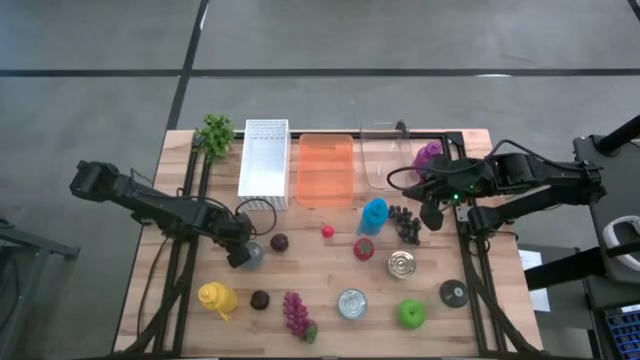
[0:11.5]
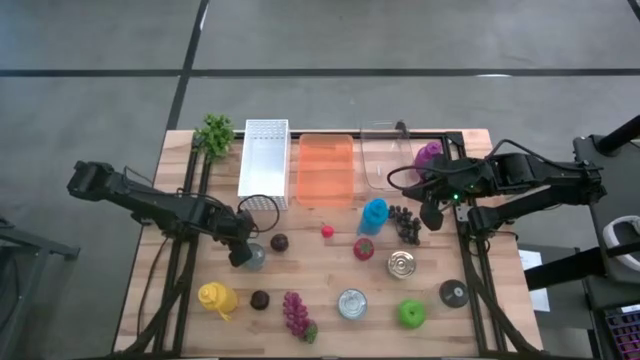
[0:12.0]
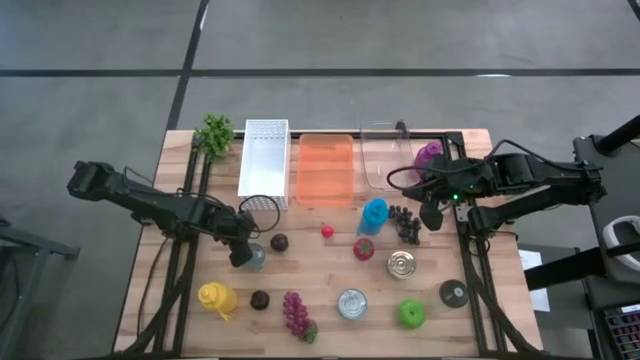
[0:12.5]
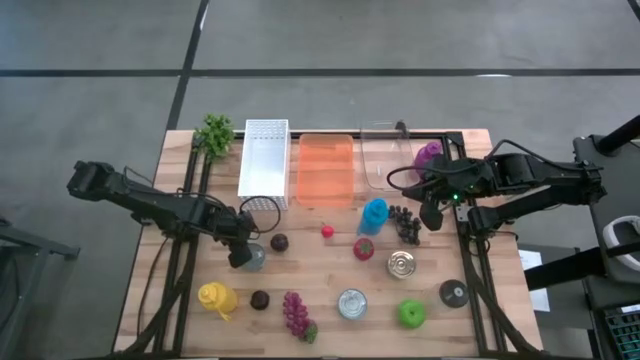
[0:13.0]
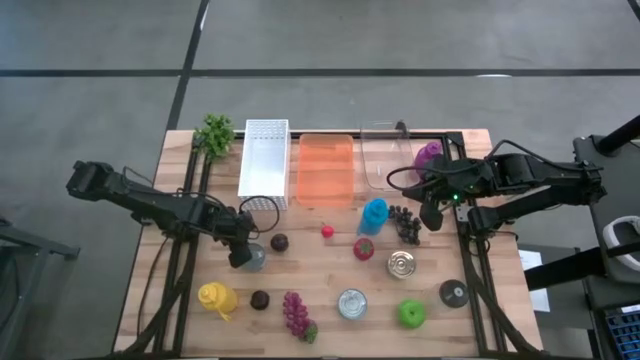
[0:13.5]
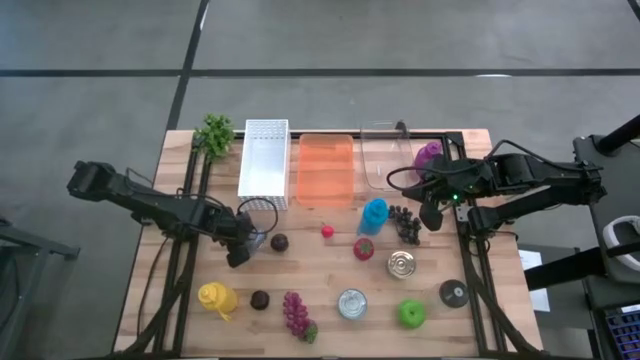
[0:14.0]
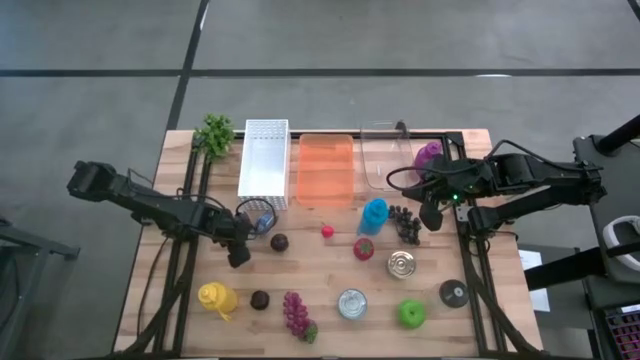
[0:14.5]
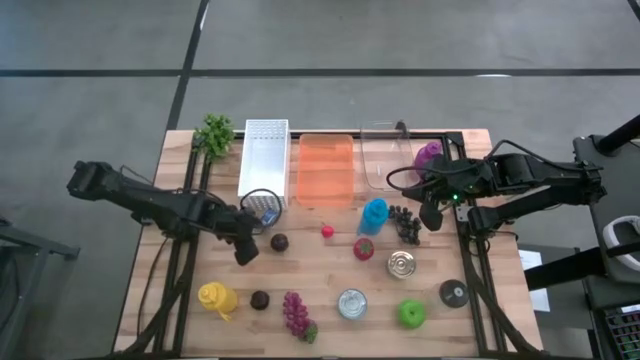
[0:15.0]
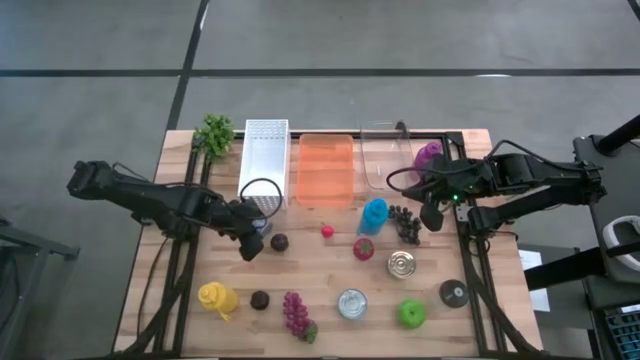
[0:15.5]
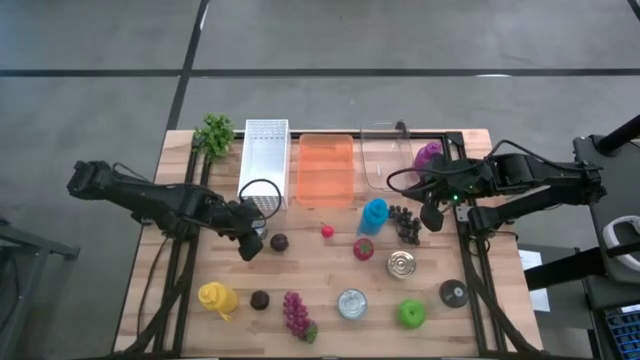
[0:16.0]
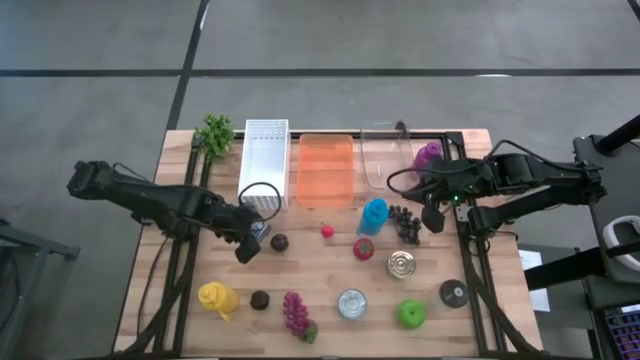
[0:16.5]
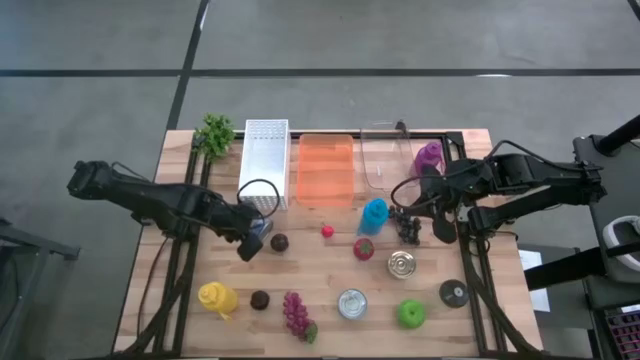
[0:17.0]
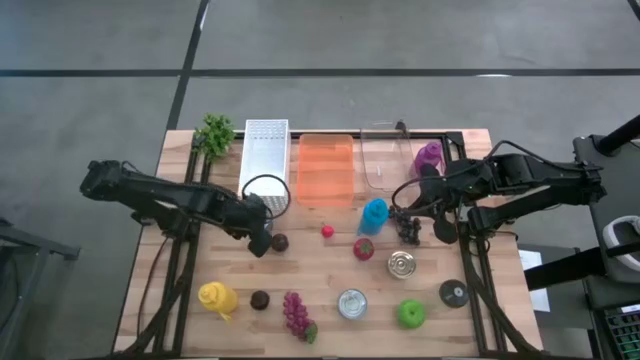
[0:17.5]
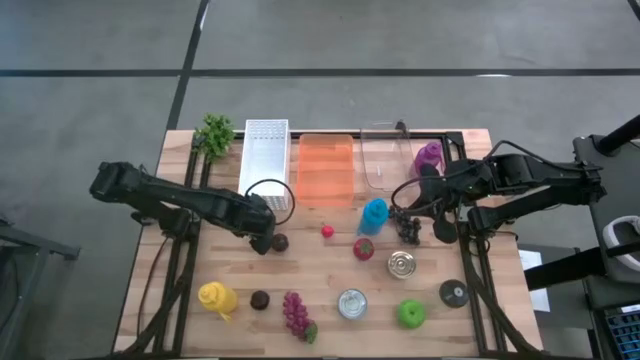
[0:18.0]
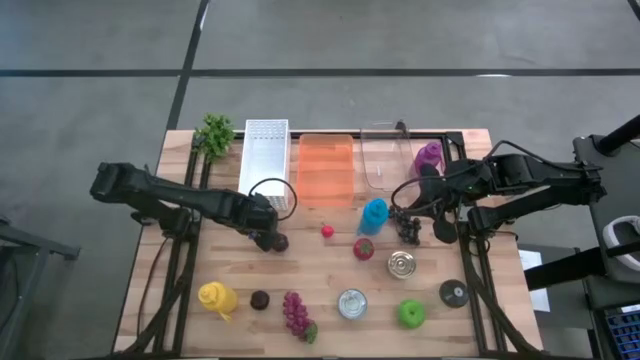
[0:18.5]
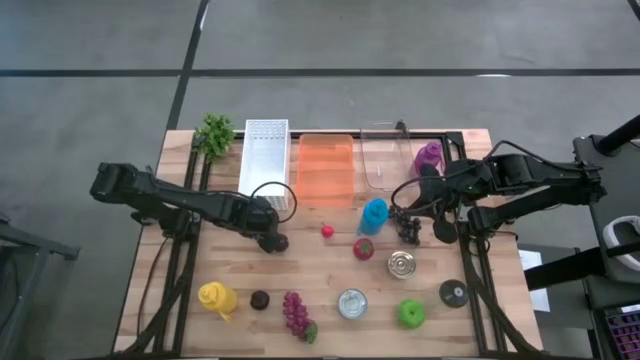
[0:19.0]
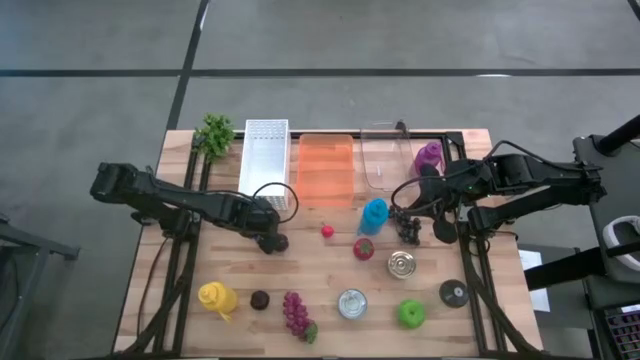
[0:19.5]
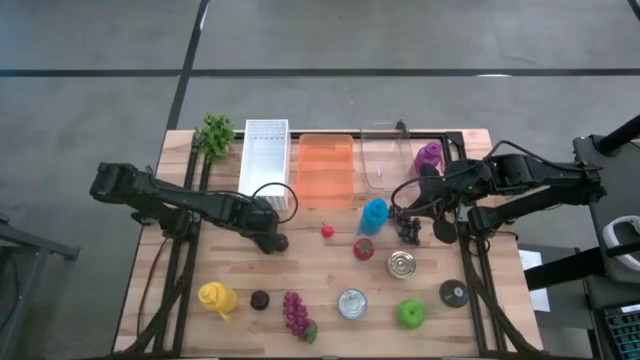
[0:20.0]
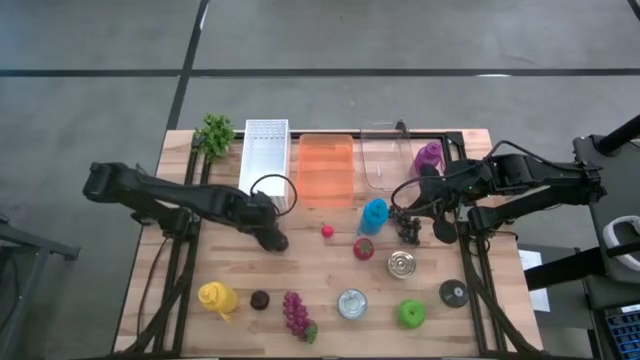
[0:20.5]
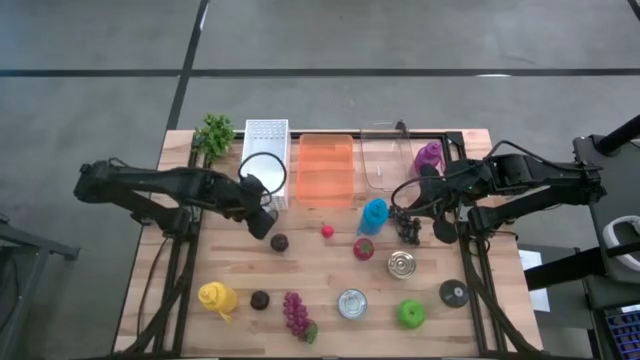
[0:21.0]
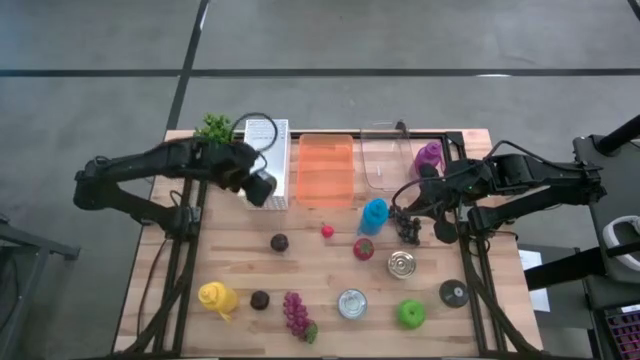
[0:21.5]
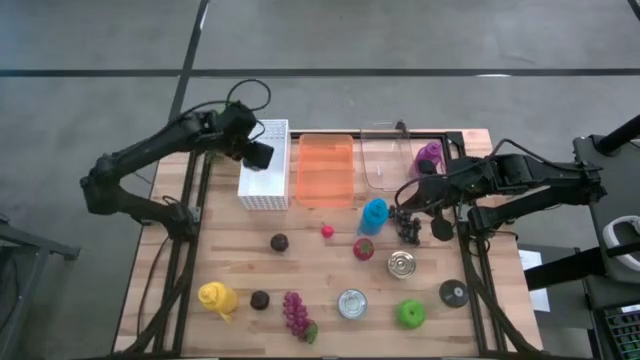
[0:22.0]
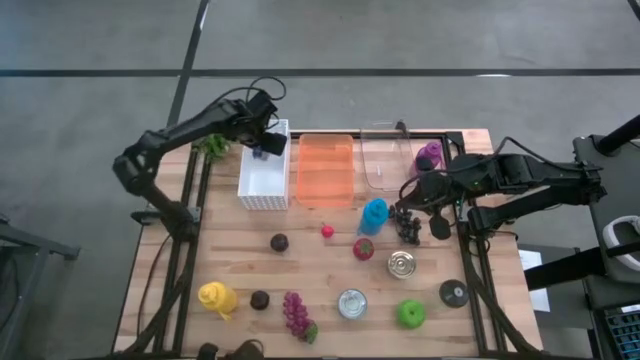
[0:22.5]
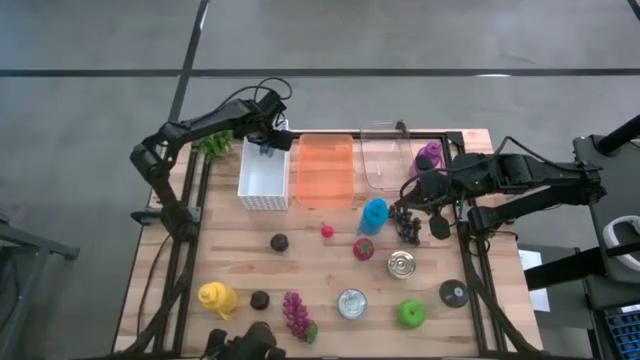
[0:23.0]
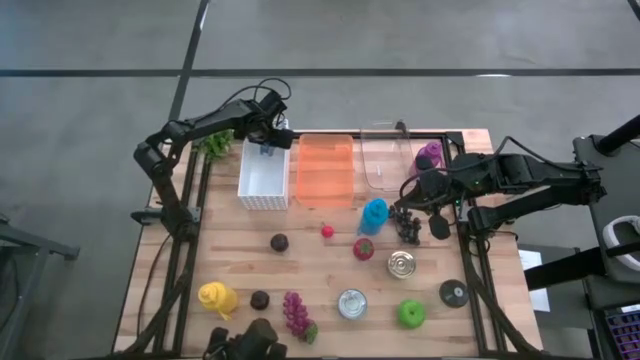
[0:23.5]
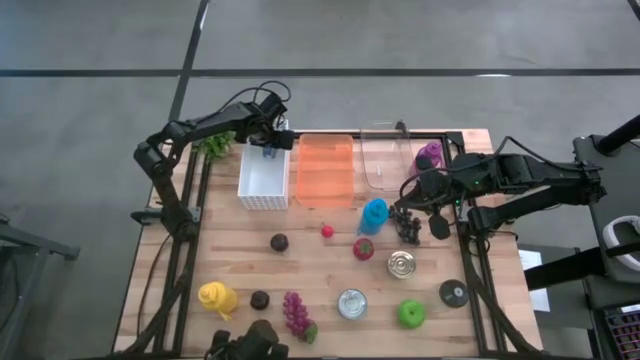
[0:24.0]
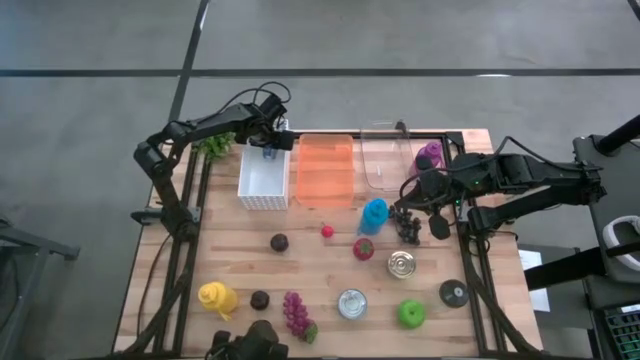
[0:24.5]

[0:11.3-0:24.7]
Task: Pick & Place Food Item
Put the left blue tuna can into the white bin

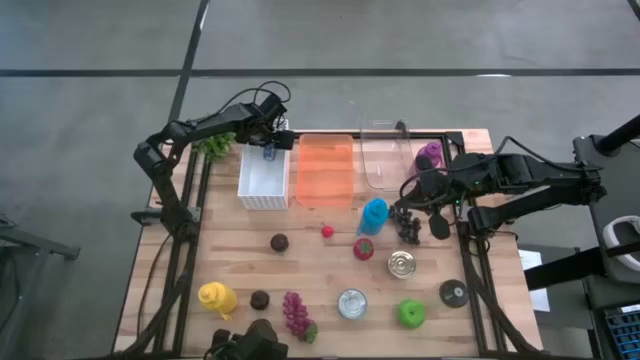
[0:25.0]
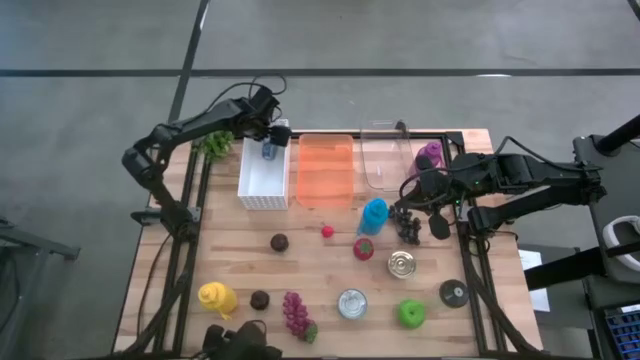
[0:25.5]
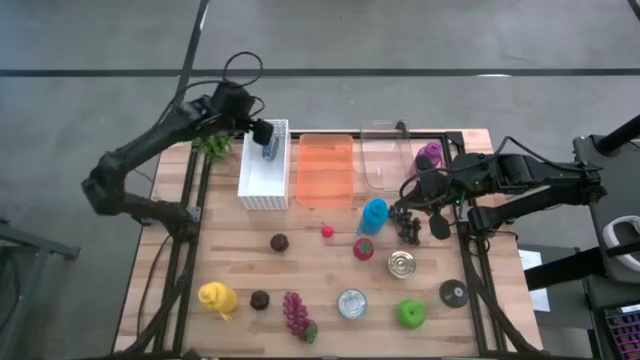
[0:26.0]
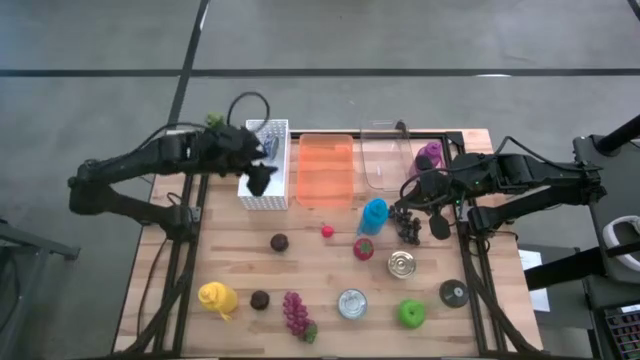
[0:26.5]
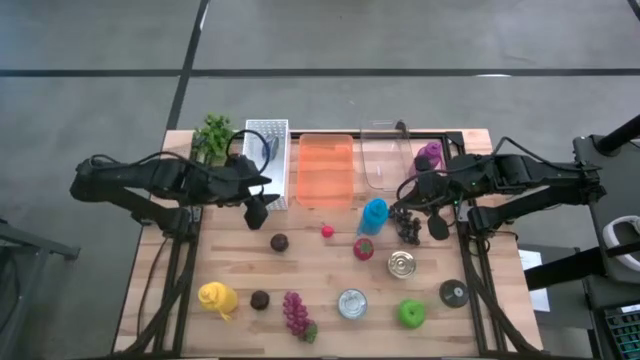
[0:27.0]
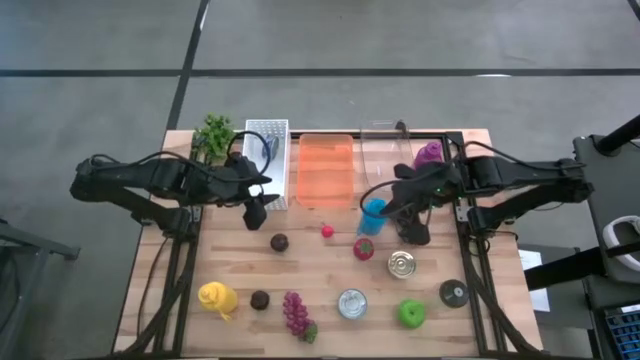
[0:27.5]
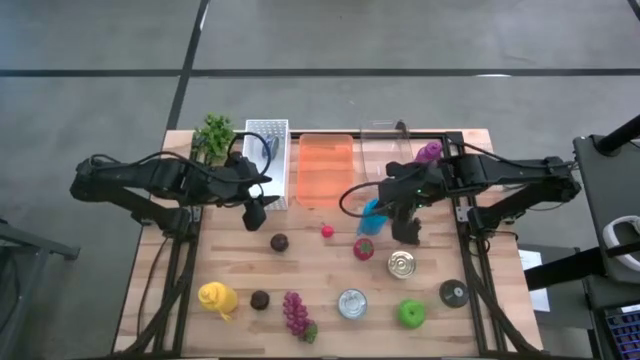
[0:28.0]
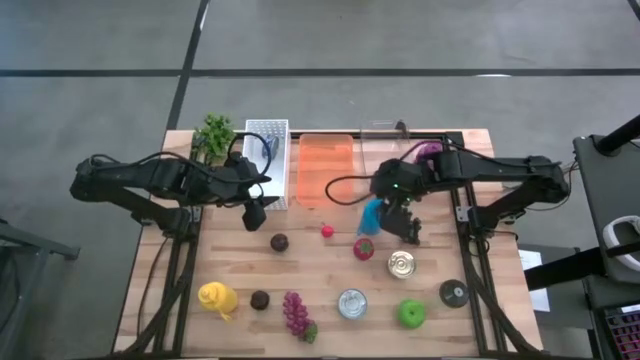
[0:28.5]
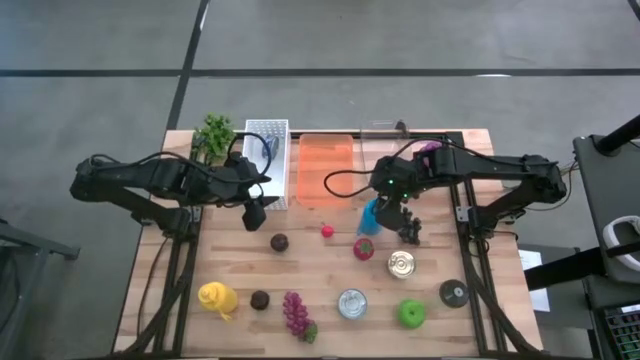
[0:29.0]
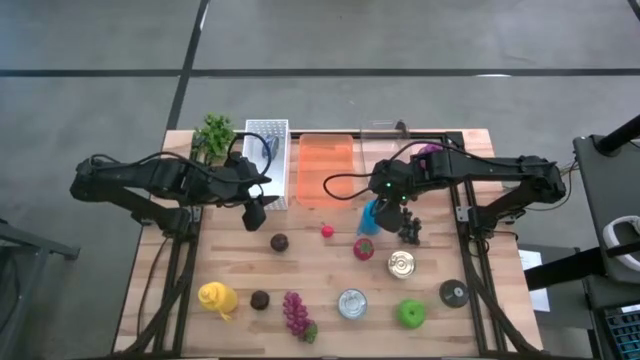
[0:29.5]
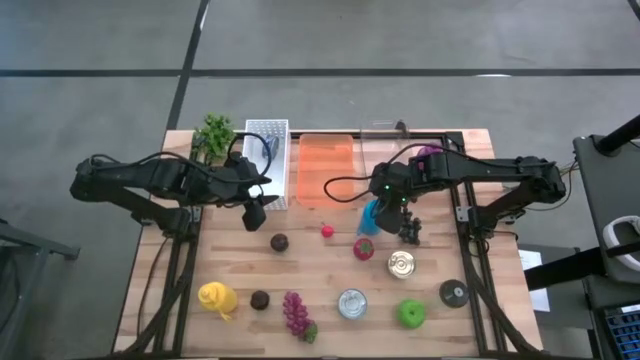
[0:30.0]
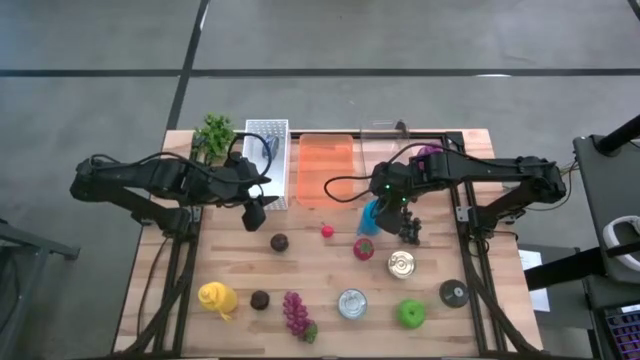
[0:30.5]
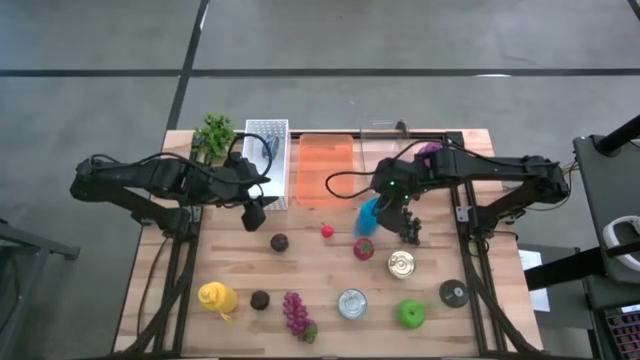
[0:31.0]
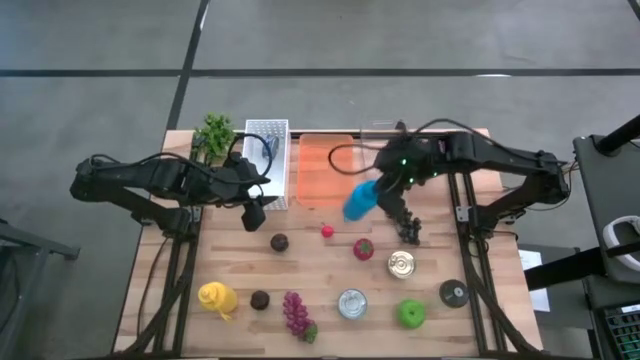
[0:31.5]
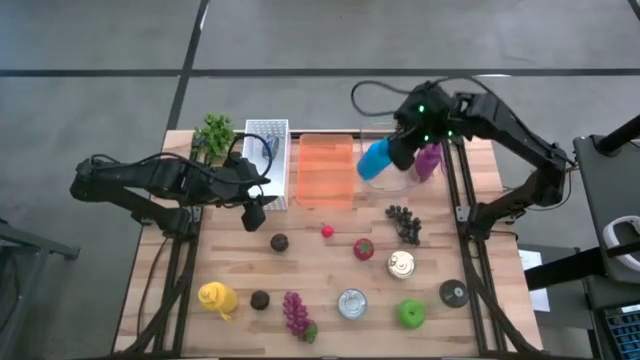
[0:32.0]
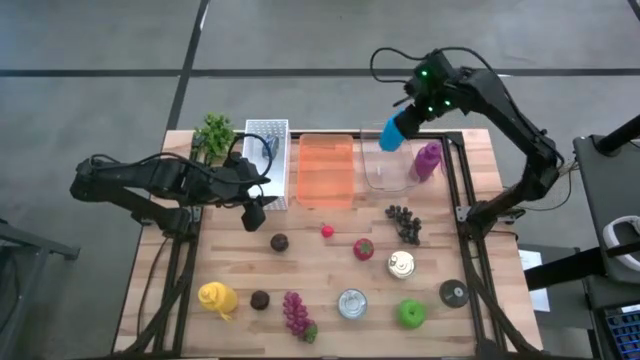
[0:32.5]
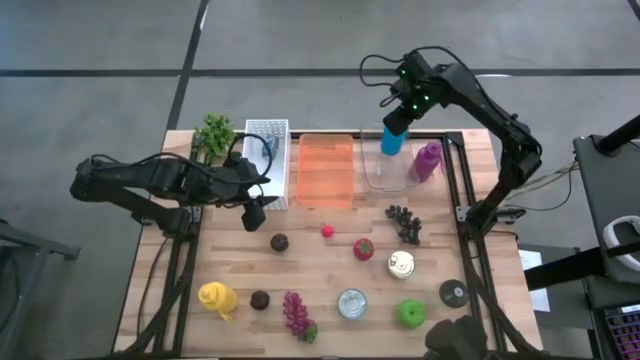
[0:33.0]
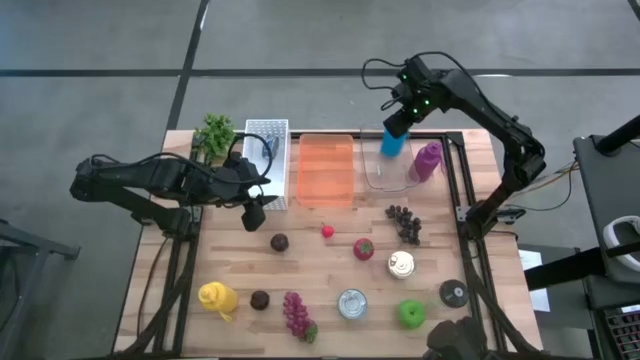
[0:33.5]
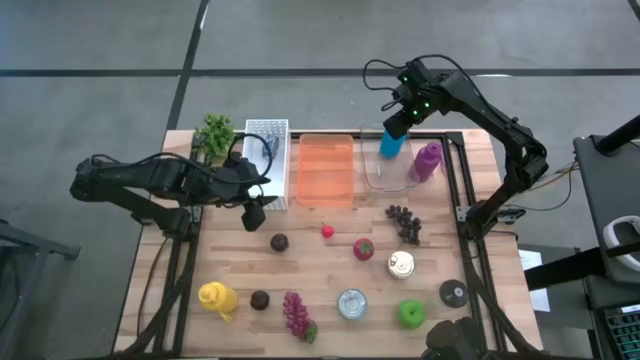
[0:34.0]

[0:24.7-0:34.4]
Put the blue tumbler into the transparent bin
